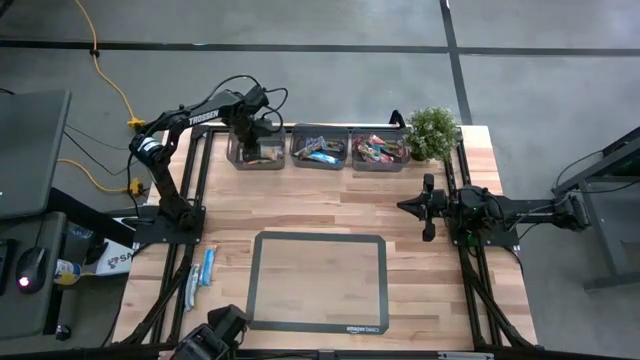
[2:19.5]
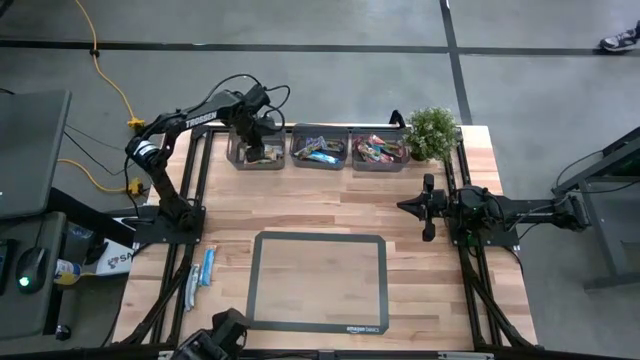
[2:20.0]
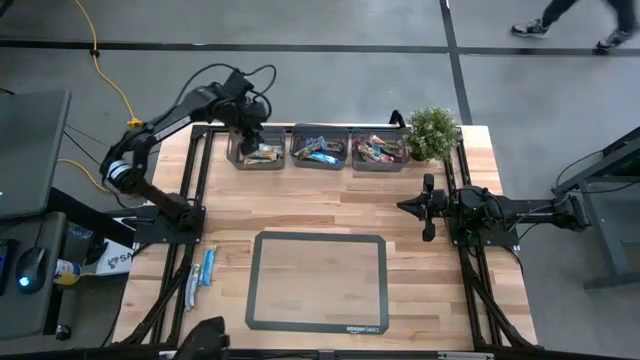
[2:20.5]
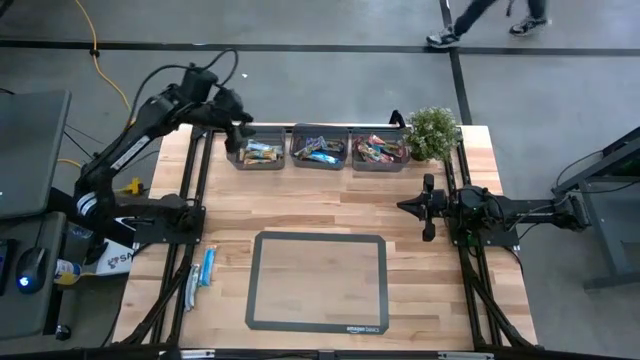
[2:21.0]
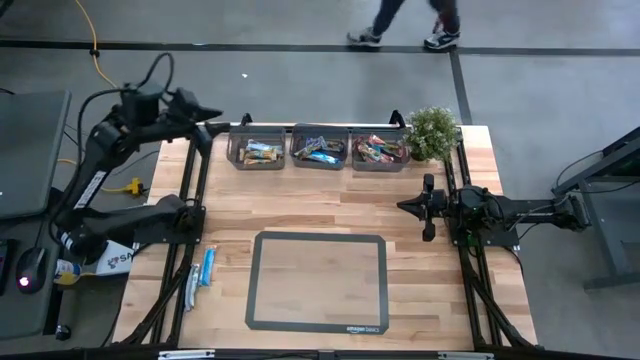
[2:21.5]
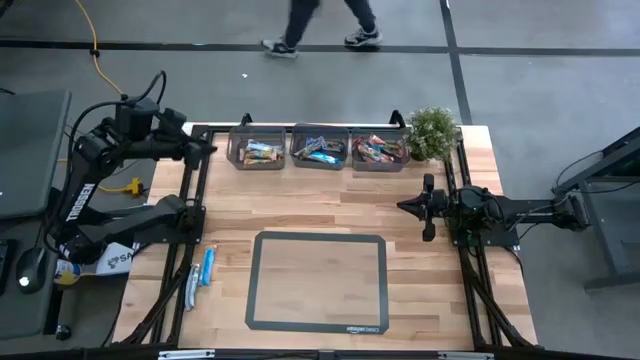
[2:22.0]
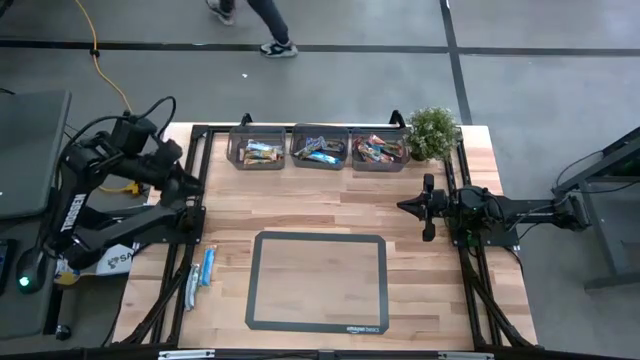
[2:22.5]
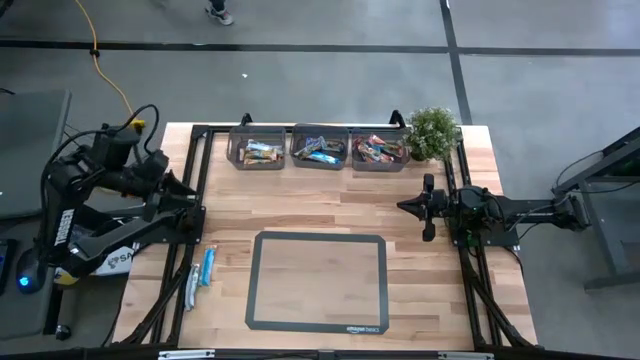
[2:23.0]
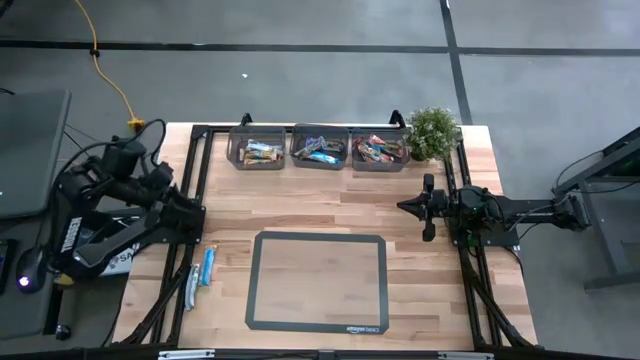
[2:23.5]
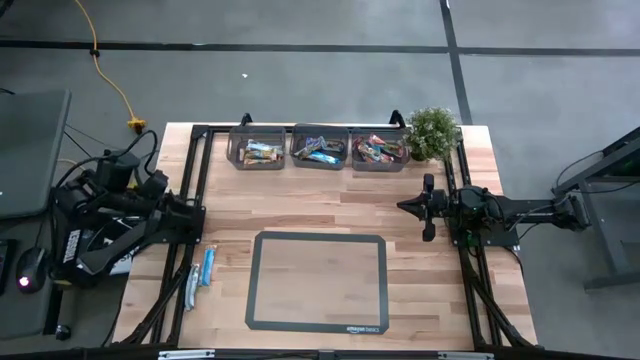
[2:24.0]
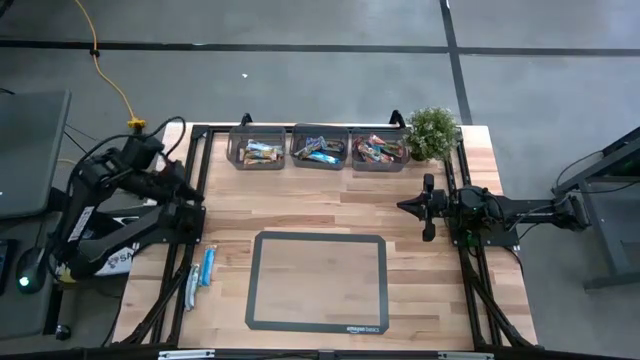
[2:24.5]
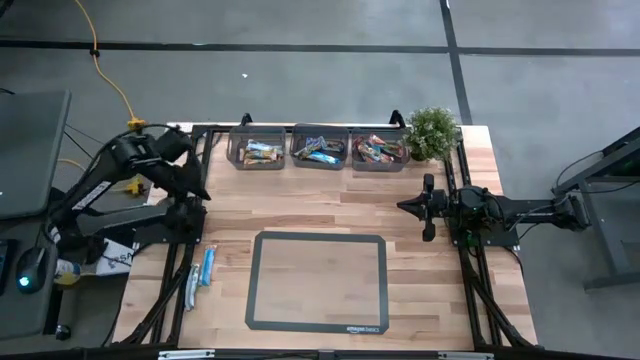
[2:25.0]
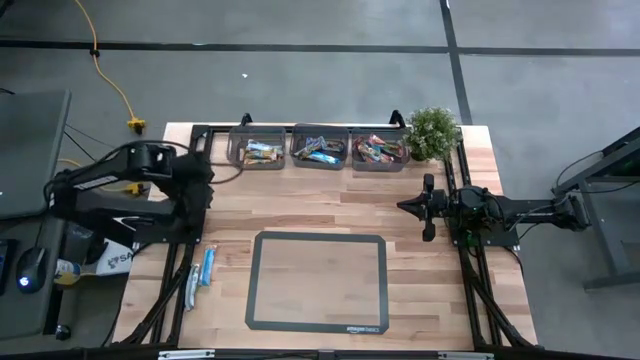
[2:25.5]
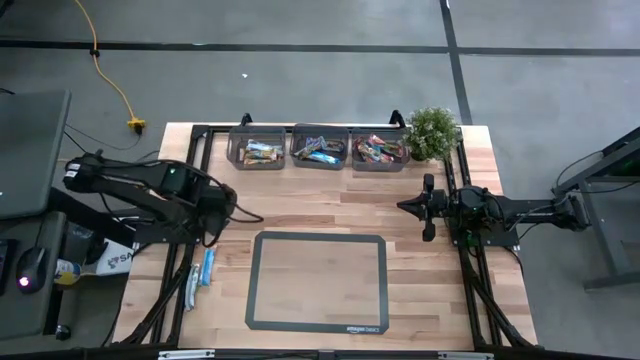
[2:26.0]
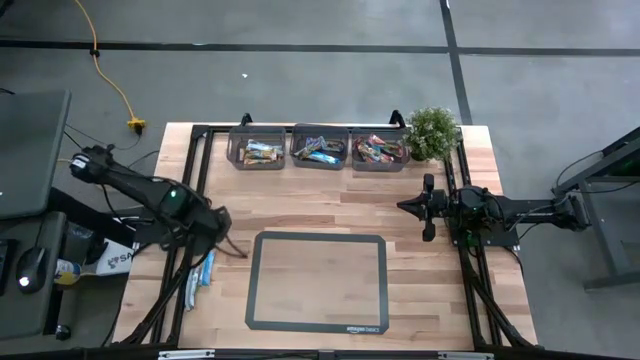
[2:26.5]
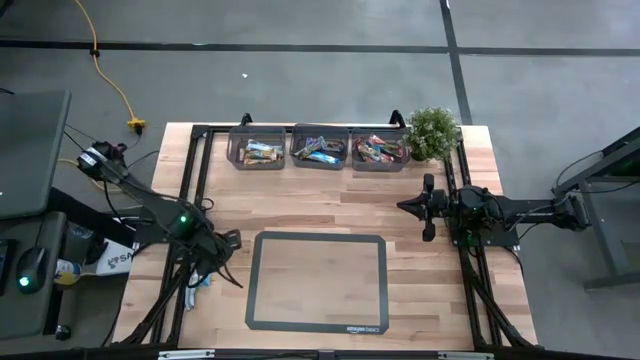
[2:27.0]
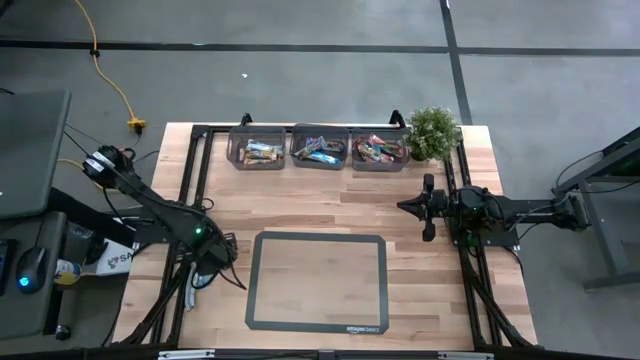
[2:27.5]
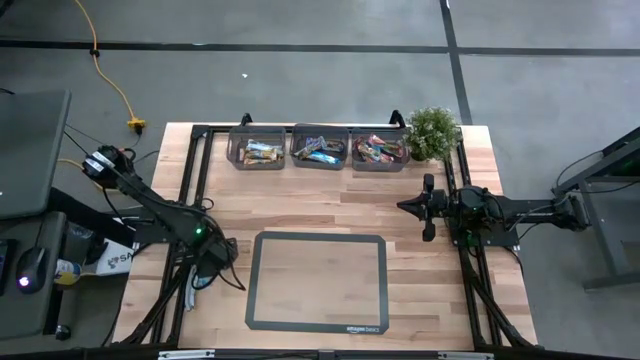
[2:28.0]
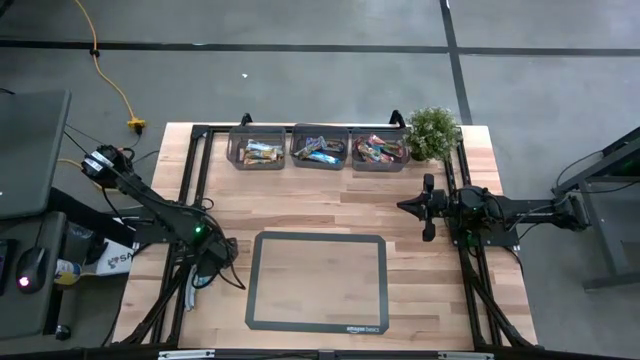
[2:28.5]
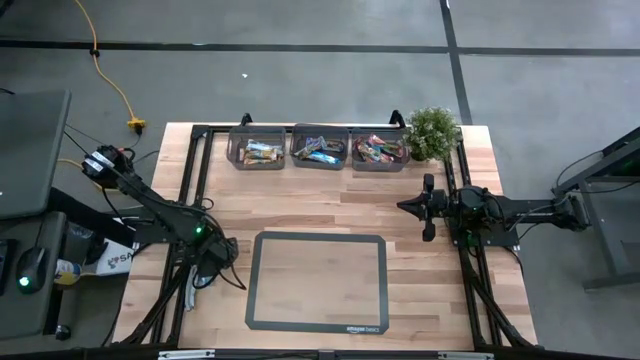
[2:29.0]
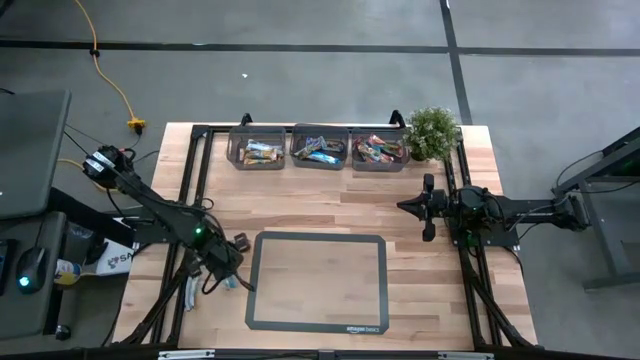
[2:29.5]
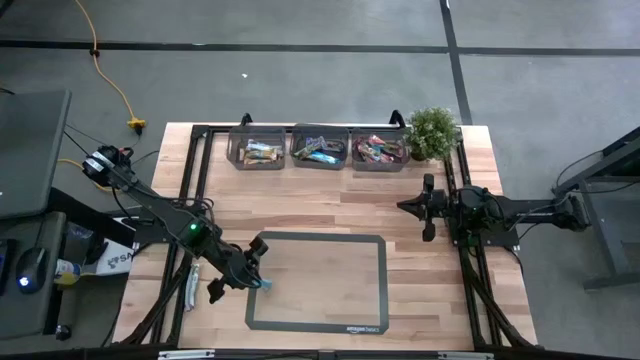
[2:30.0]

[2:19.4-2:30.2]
Task: Pick and place Granola Bars by type
Put the orange granola bar into the left black bin

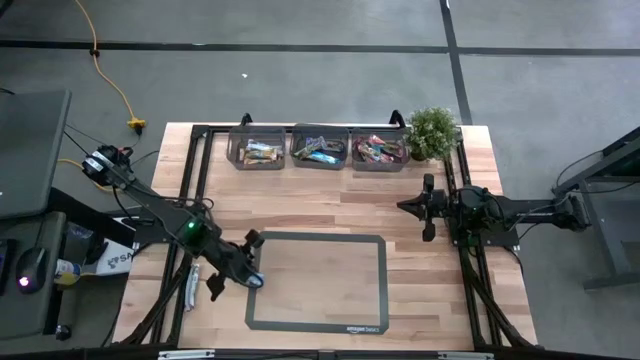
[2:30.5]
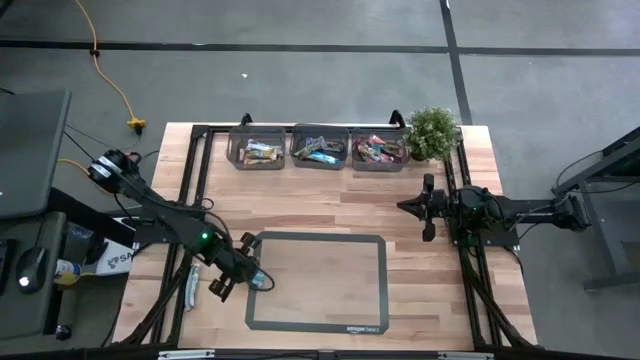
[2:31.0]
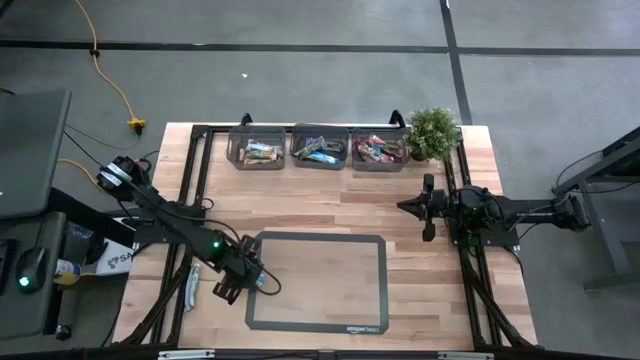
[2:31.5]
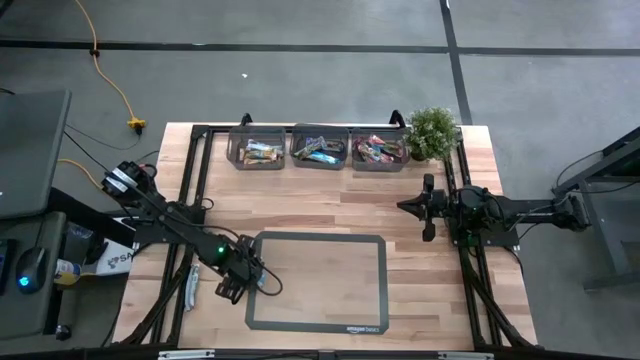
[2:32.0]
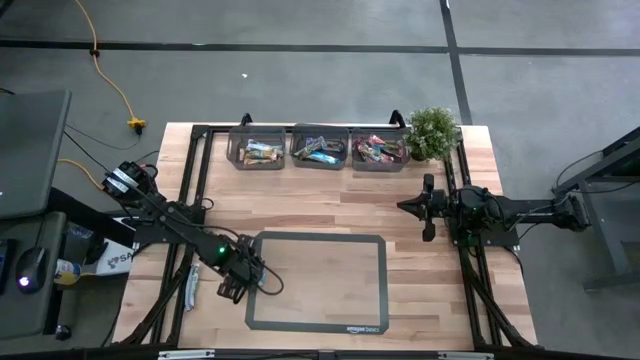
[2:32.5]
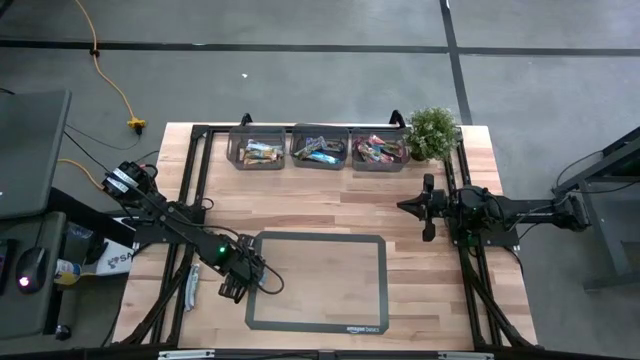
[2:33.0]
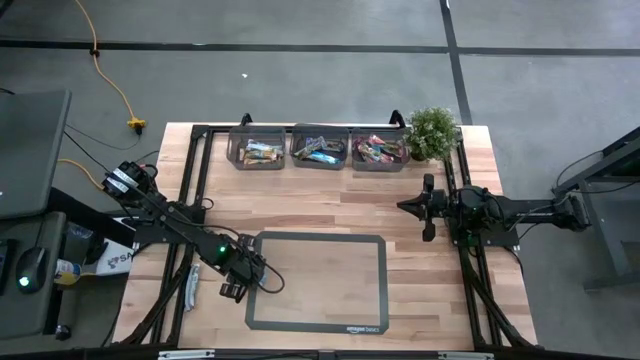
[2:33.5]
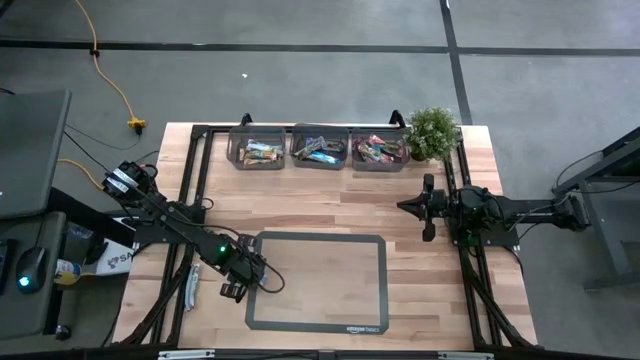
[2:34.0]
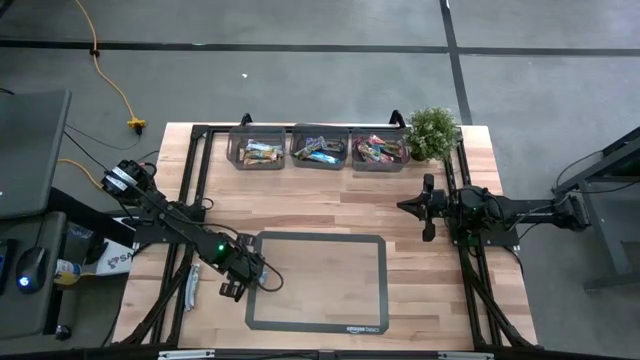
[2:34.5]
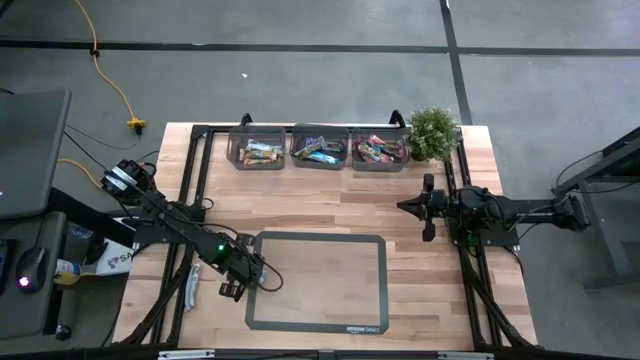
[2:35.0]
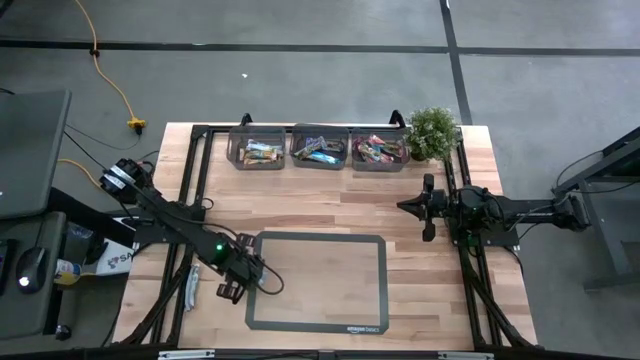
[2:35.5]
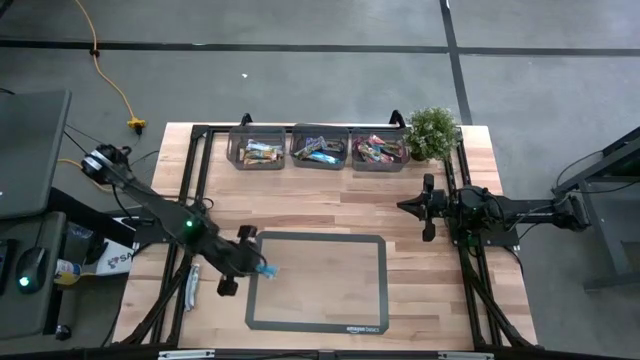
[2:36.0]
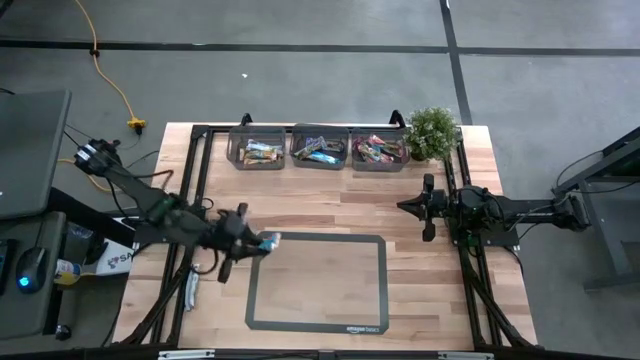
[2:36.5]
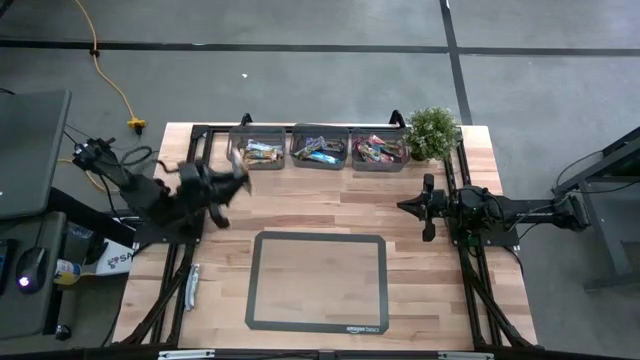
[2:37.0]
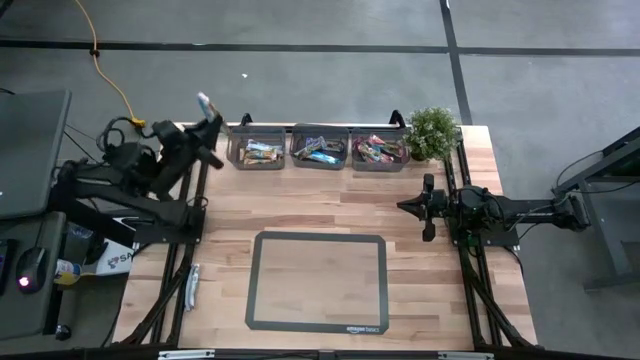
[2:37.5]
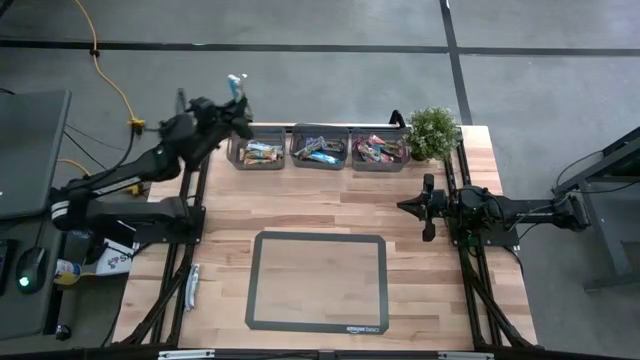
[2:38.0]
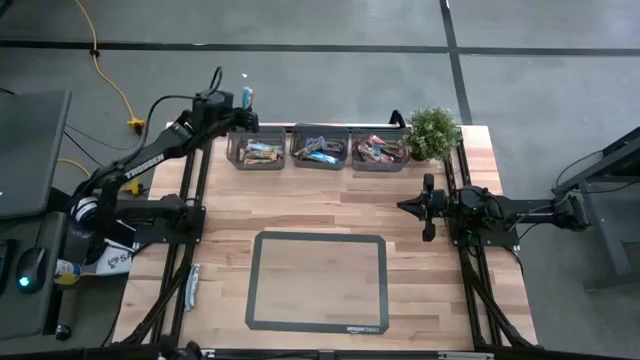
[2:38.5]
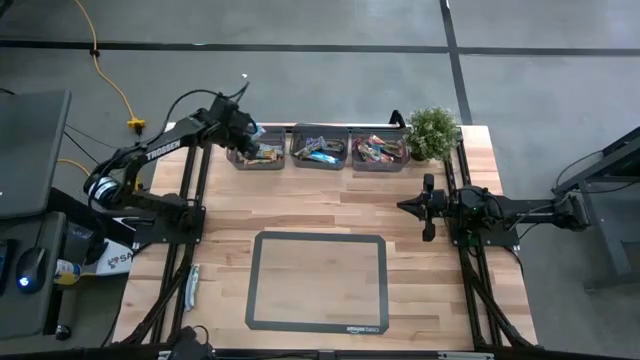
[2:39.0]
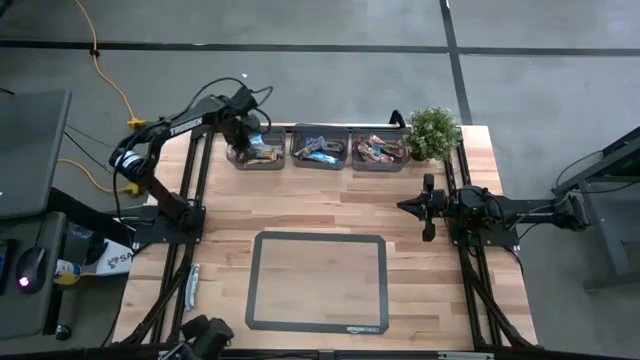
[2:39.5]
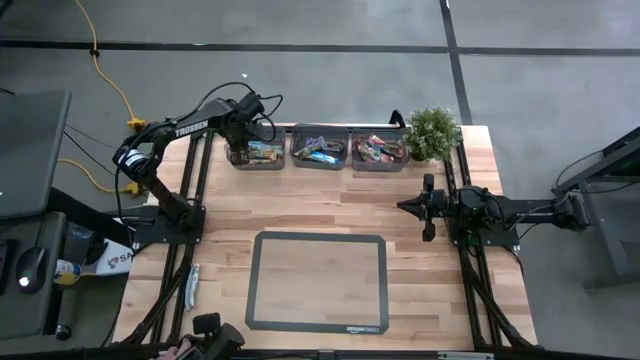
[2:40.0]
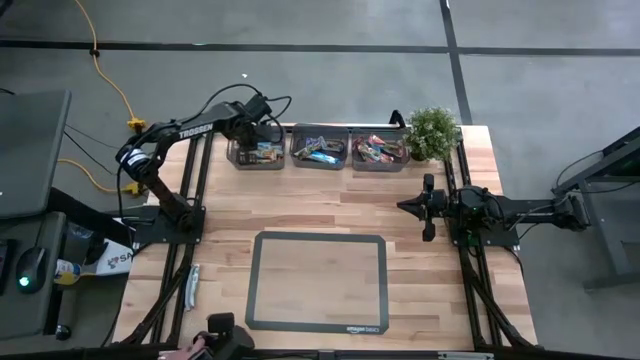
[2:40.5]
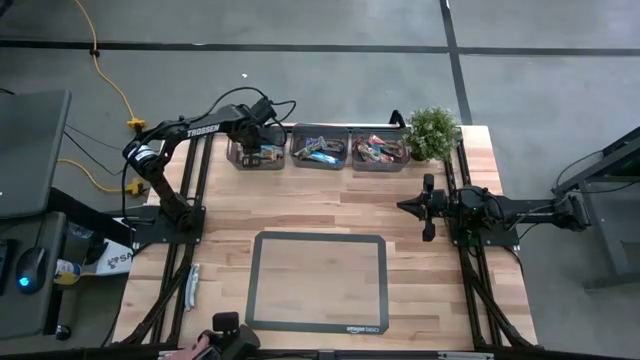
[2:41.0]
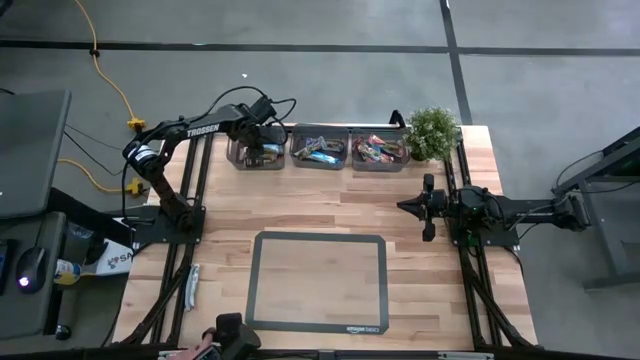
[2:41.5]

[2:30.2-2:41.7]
Put the orange granola bar into the left black bin
